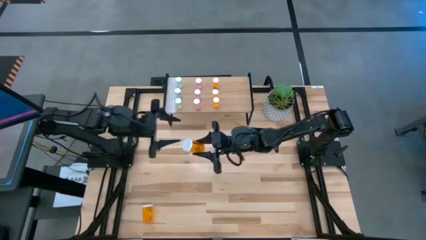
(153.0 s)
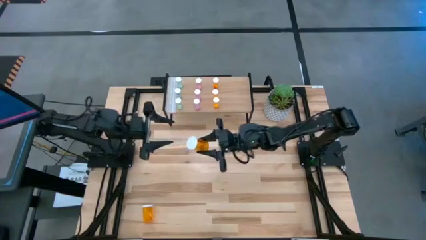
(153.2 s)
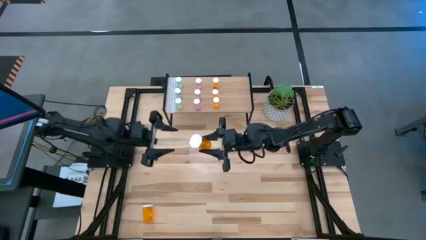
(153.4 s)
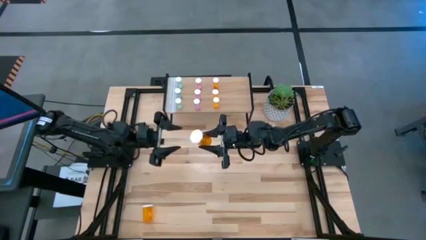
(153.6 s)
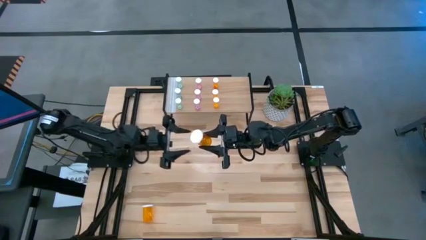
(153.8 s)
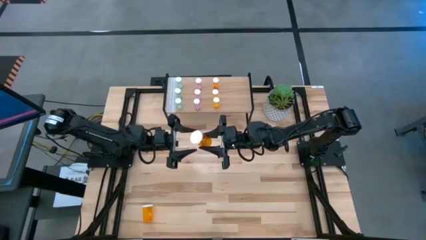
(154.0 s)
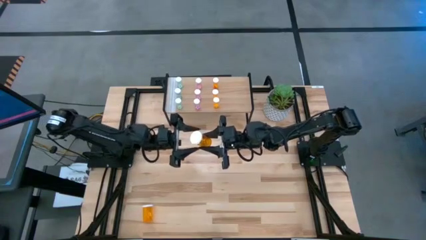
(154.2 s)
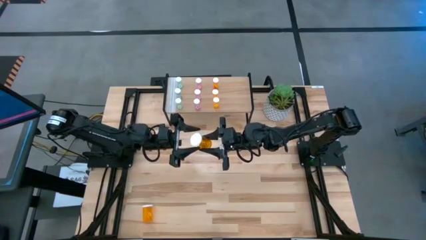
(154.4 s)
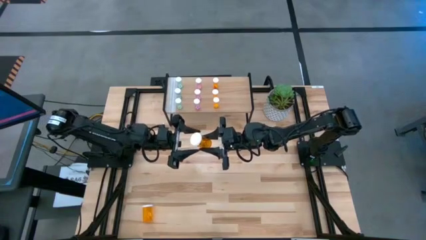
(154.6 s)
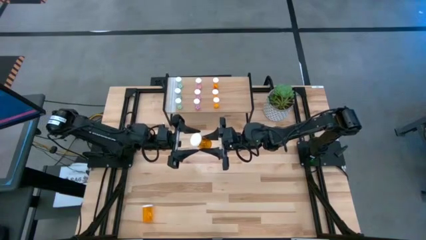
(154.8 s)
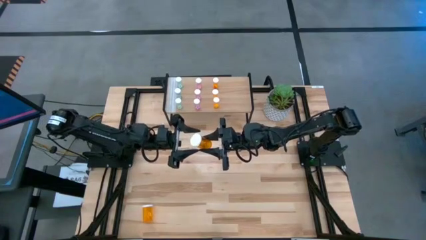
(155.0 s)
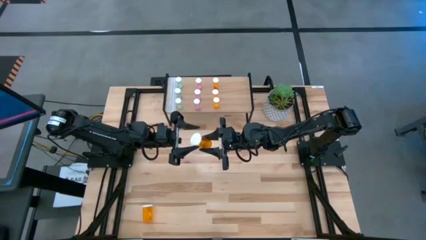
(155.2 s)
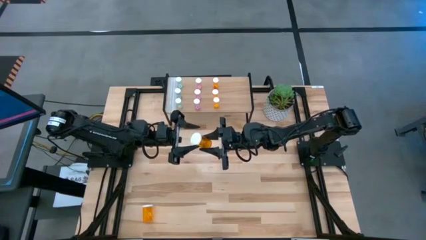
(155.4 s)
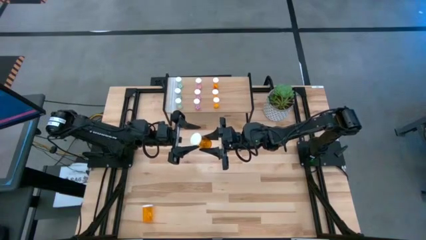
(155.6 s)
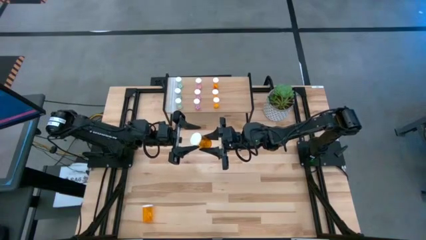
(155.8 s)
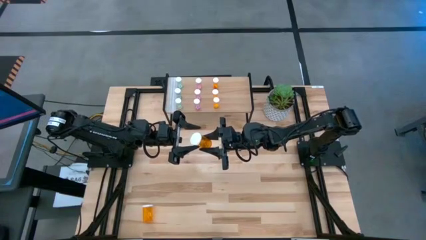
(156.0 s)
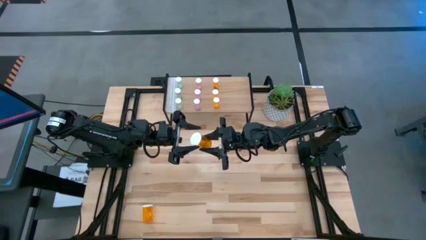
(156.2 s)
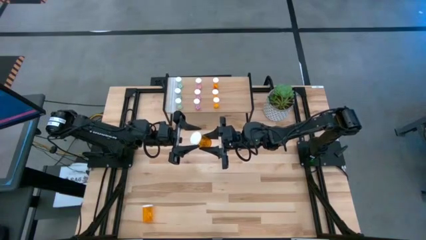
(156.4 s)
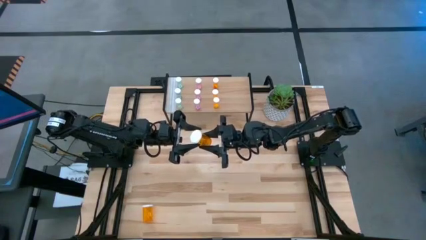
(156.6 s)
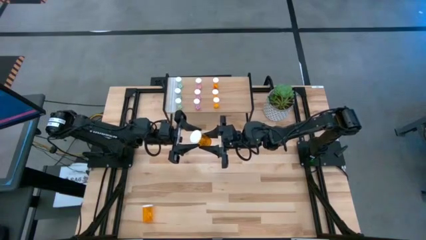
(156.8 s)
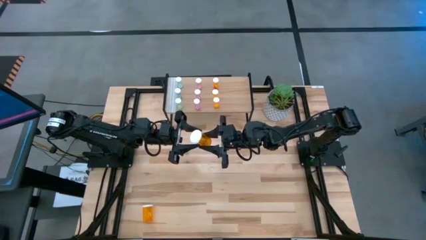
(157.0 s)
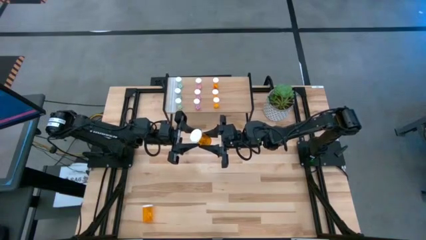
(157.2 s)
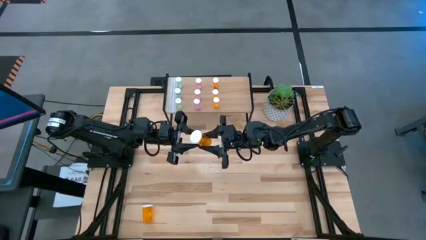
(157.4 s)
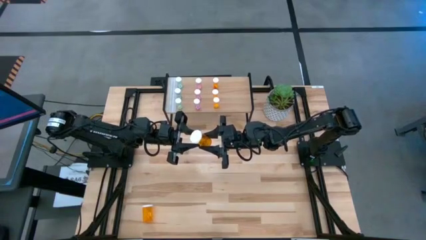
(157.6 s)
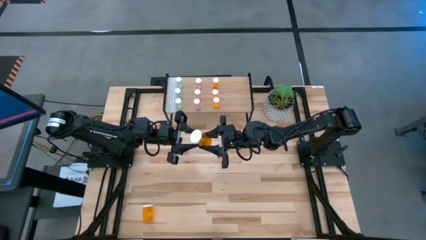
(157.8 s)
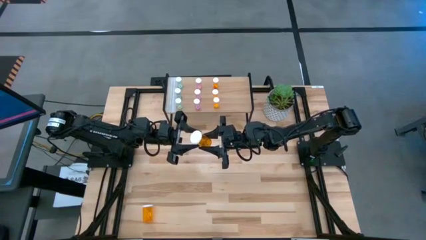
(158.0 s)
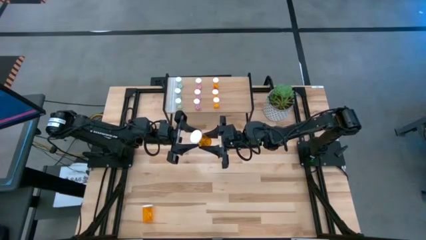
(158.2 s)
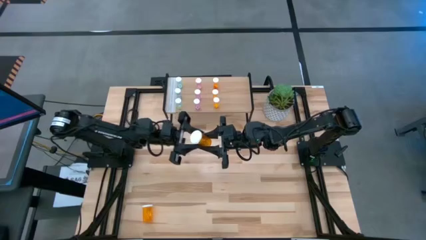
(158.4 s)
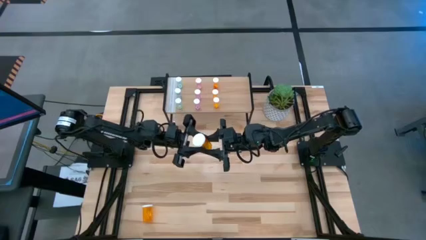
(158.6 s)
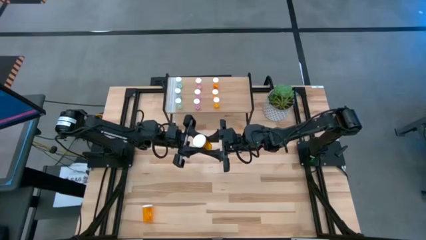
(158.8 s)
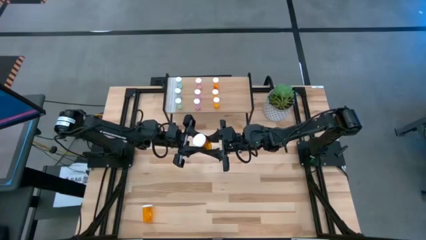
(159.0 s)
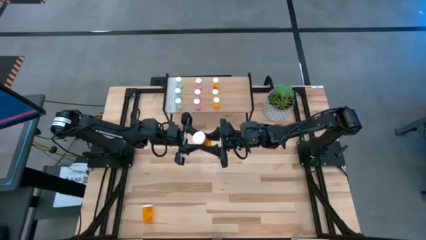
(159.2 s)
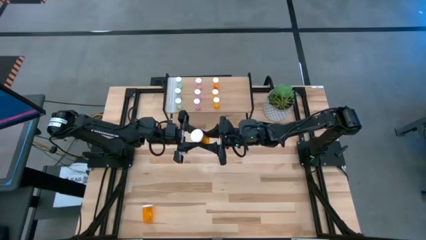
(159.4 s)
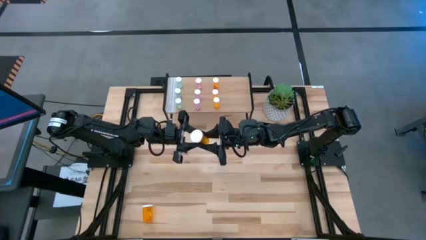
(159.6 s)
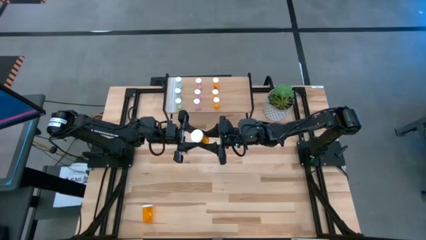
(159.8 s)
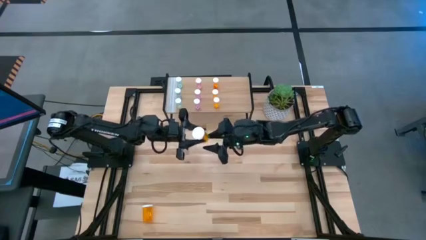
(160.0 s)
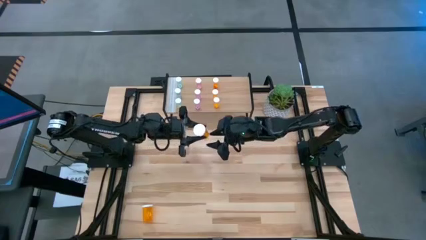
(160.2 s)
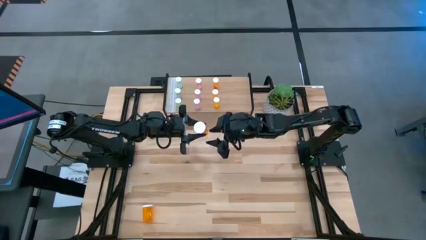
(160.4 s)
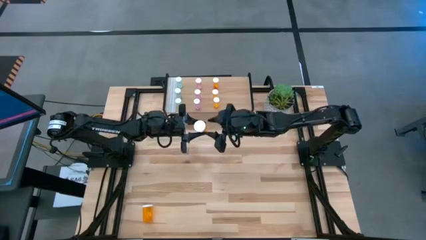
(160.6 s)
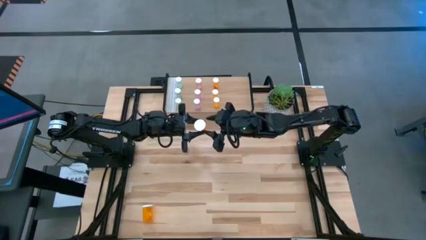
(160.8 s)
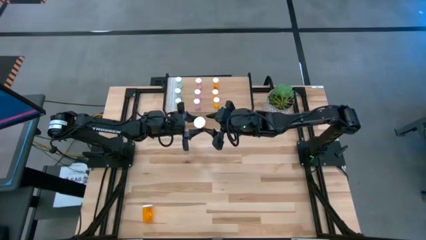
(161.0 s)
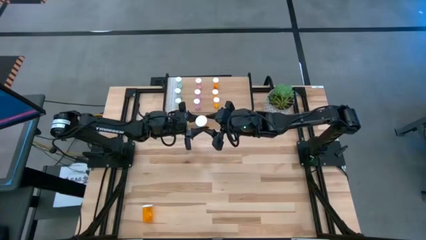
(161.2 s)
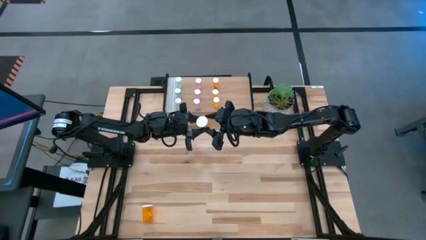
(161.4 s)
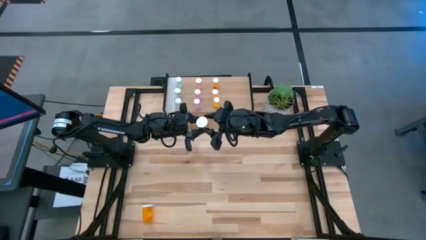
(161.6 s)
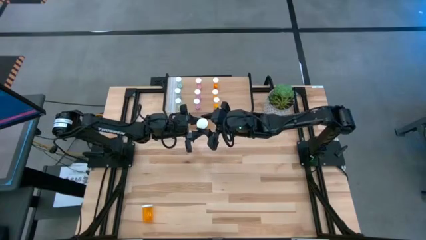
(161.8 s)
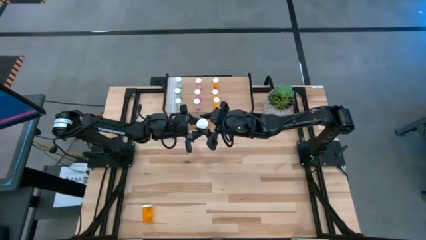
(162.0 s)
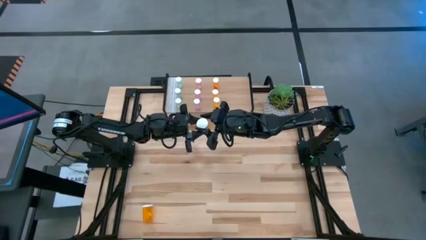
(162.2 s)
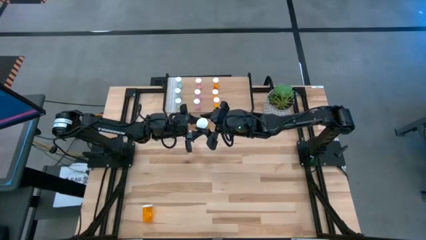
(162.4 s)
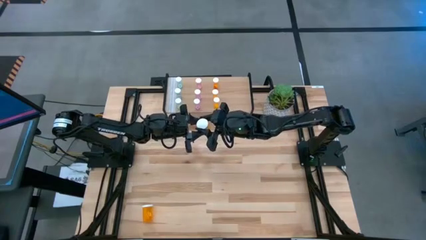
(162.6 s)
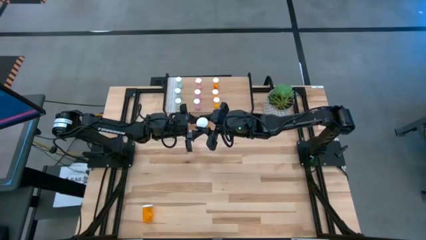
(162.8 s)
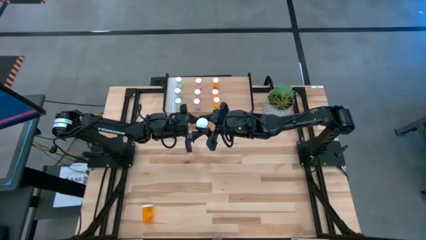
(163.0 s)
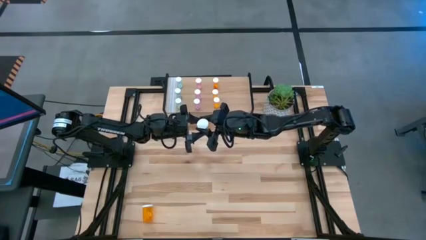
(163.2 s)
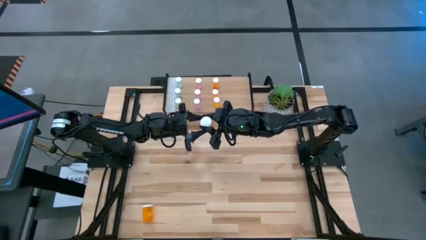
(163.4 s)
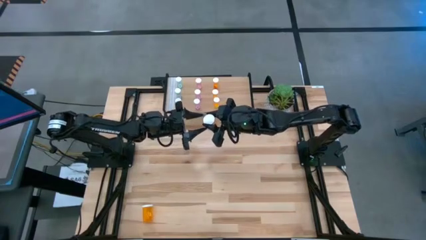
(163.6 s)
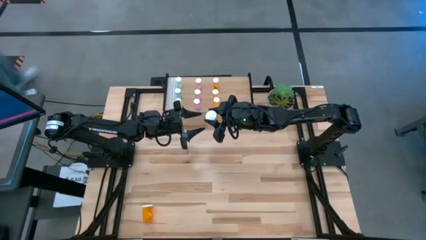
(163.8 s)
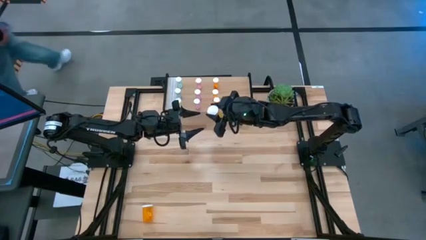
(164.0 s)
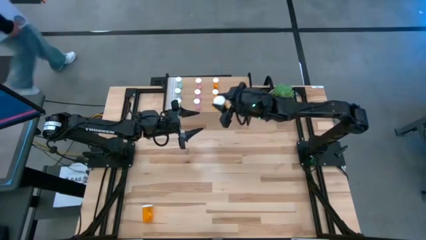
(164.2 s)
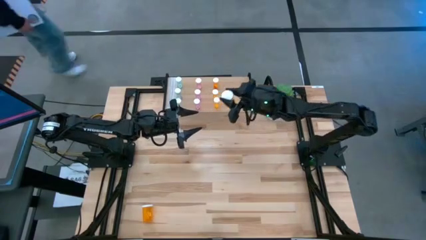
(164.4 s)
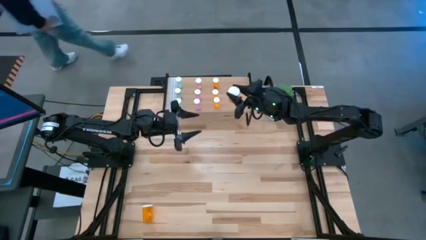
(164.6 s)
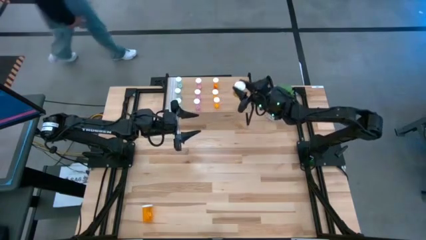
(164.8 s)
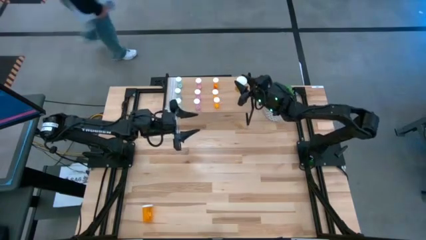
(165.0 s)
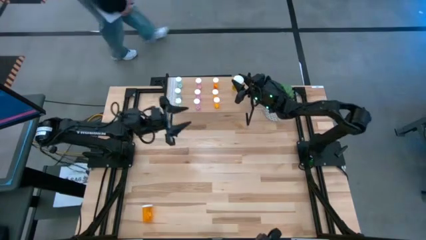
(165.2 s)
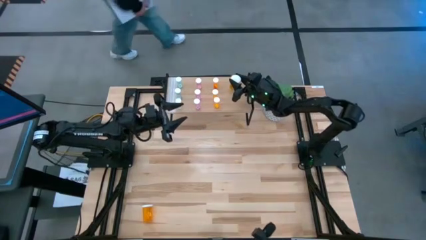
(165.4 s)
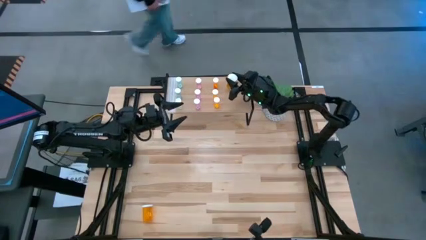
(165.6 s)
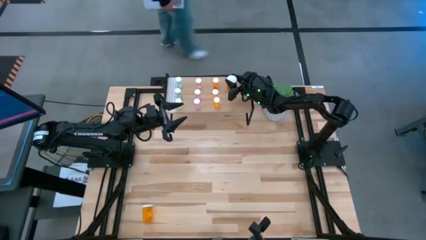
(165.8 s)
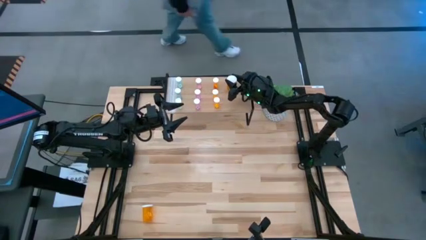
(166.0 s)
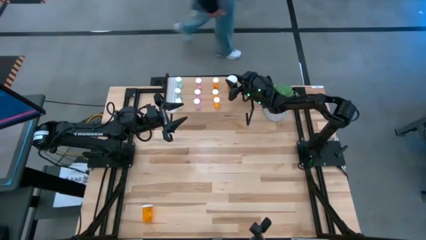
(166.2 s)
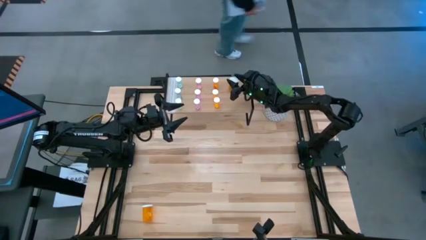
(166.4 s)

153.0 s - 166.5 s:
Task: Pick and place medicine bottles onto shelf by color
Put the top large orange pill bottle on the shelf

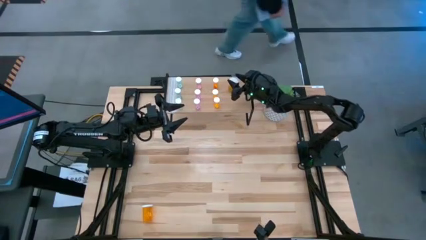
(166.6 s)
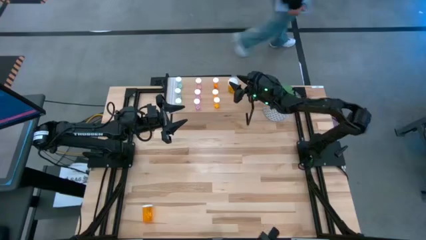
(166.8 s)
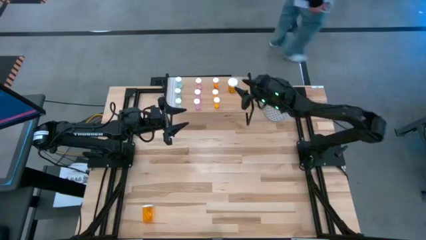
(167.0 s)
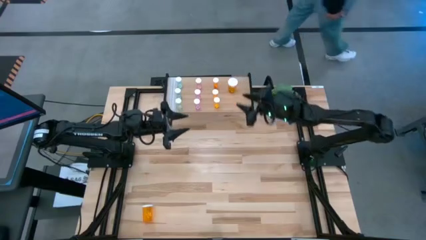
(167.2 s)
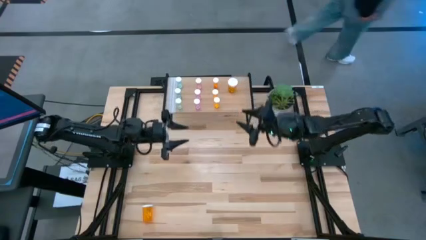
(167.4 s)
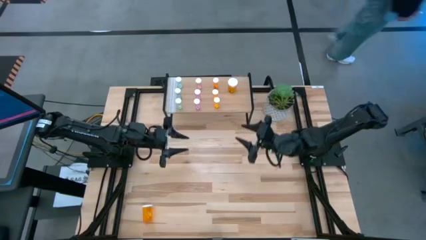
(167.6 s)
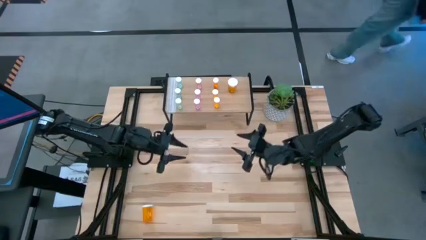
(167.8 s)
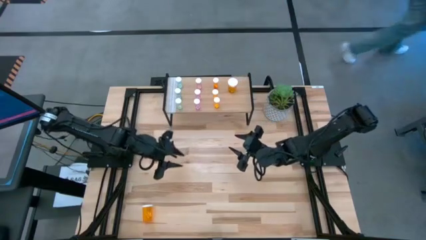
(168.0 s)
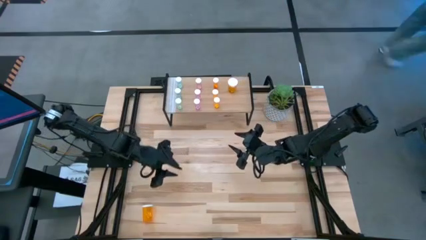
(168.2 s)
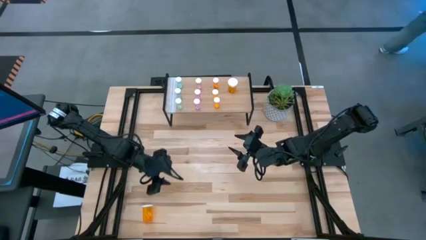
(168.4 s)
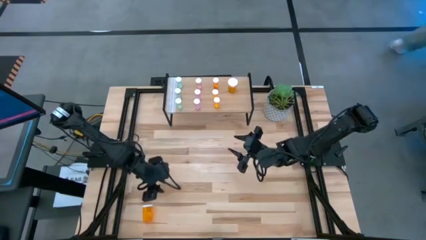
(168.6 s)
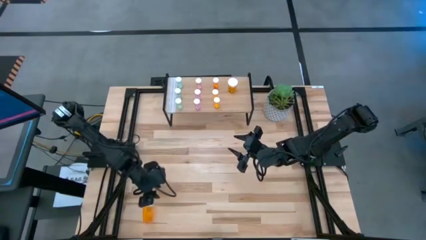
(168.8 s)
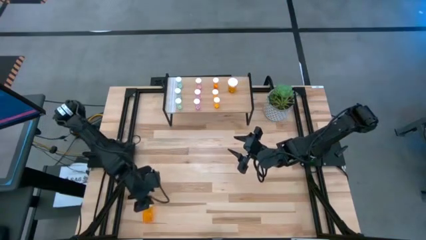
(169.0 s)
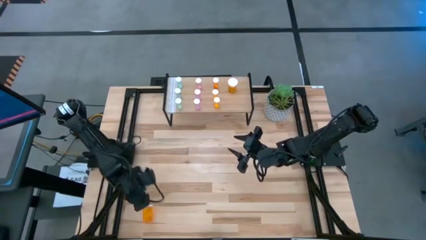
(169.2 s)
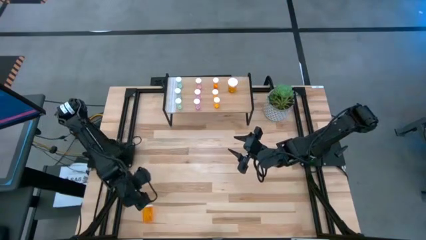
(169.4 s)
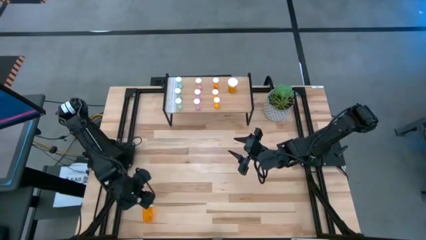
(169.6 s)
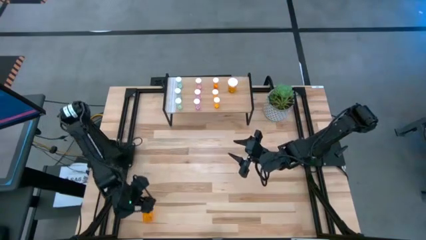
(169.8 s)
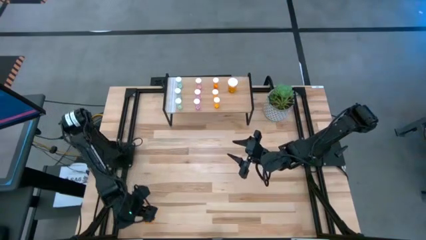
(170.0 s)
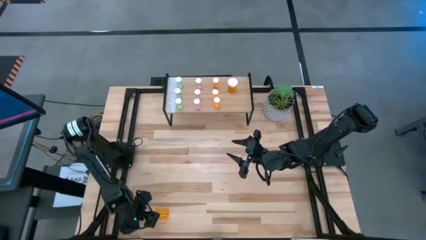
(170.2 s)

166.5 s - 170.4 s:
Put the large orange pill bottle on the shelf aligned with the other large orange pill bottle
